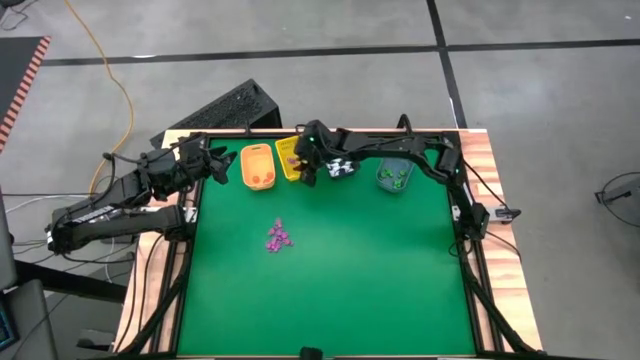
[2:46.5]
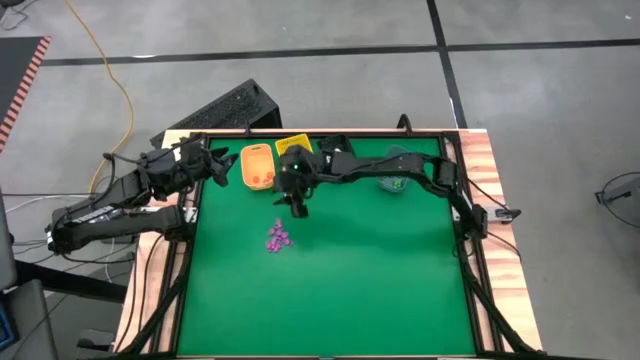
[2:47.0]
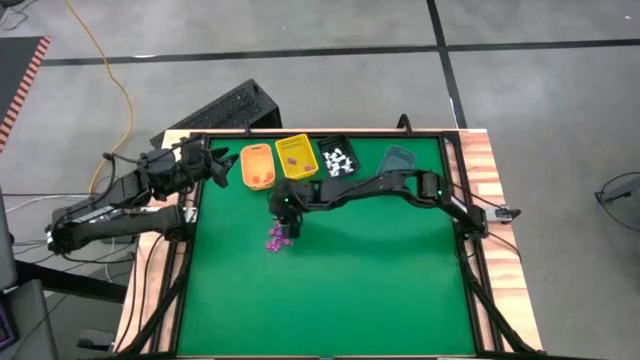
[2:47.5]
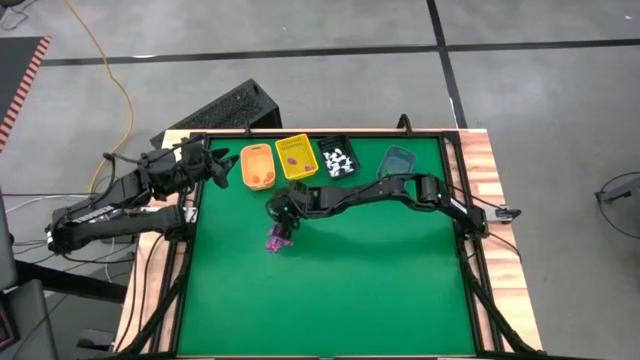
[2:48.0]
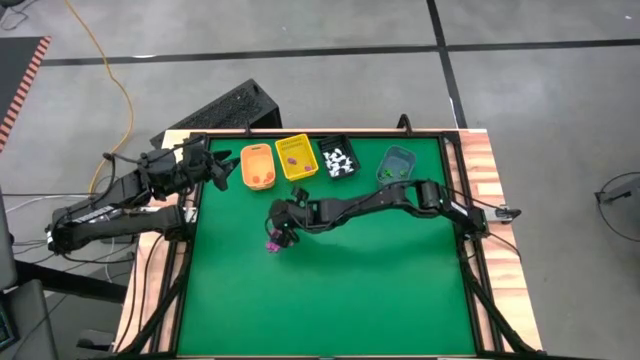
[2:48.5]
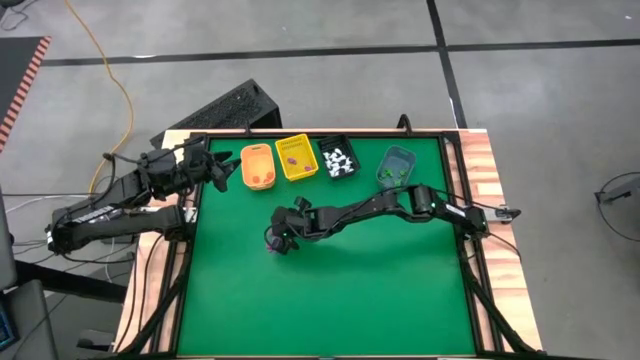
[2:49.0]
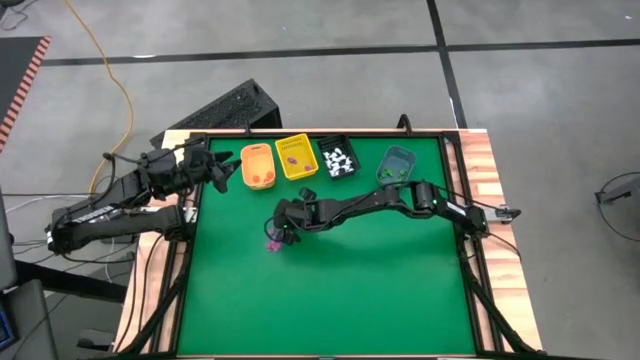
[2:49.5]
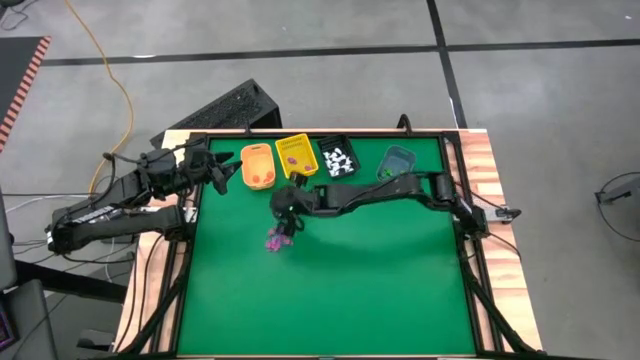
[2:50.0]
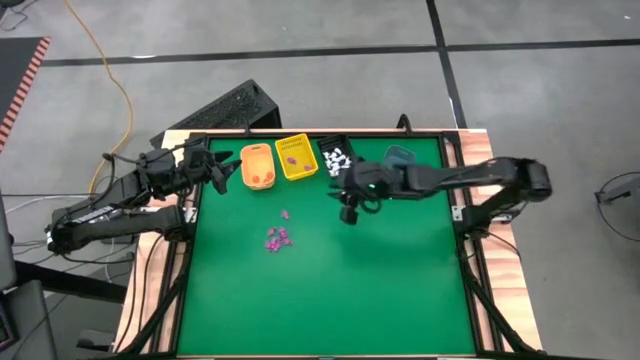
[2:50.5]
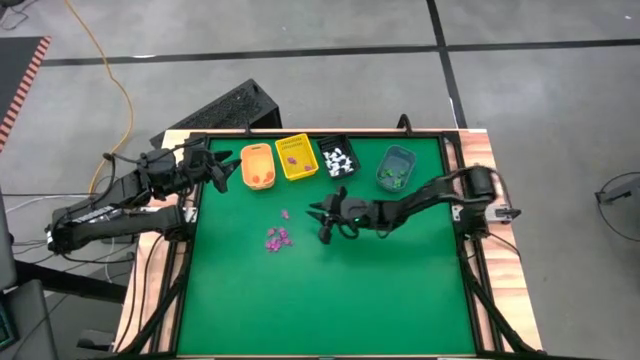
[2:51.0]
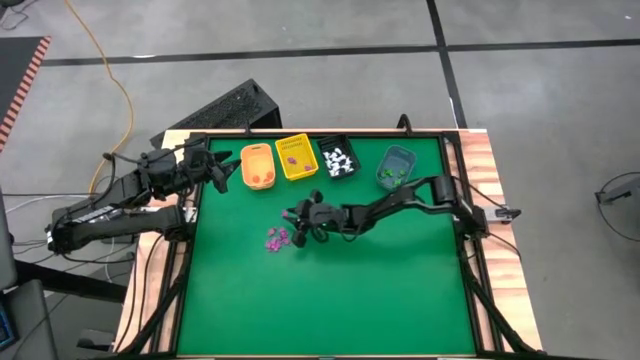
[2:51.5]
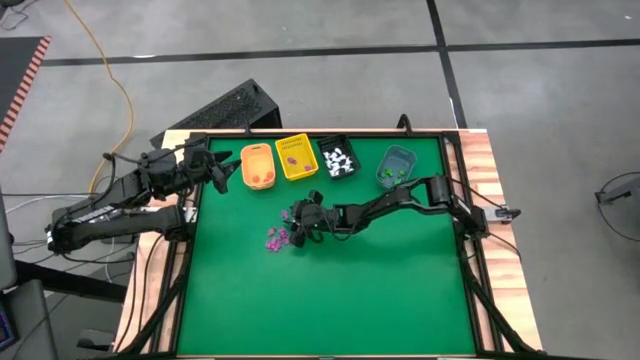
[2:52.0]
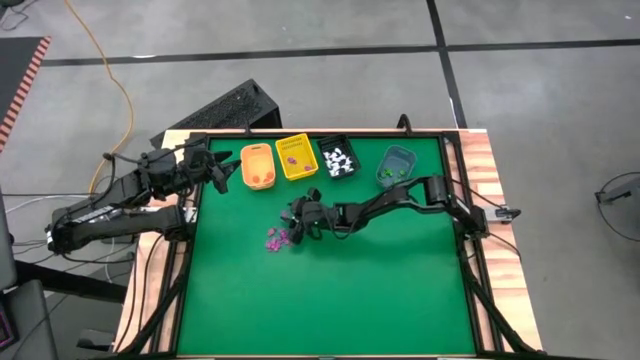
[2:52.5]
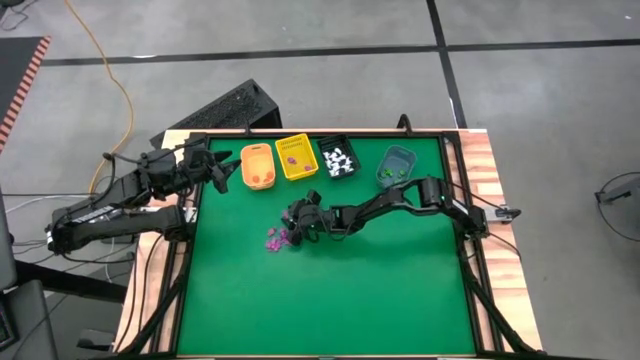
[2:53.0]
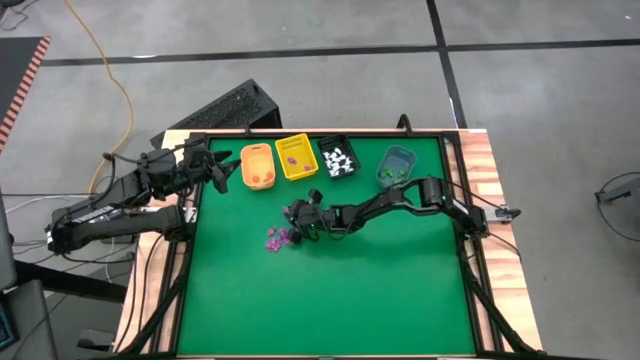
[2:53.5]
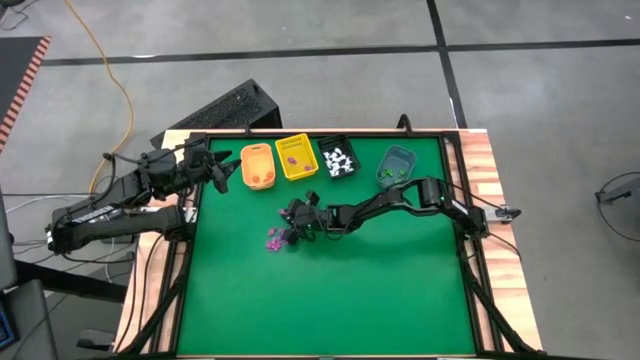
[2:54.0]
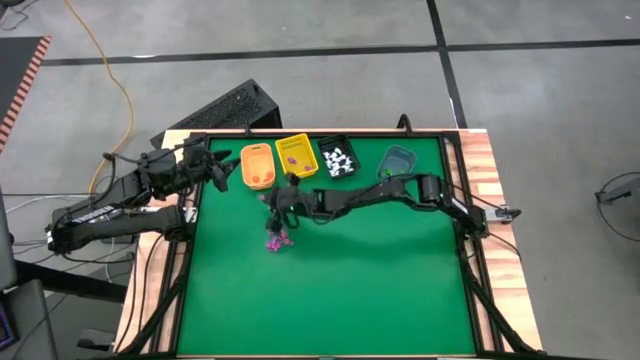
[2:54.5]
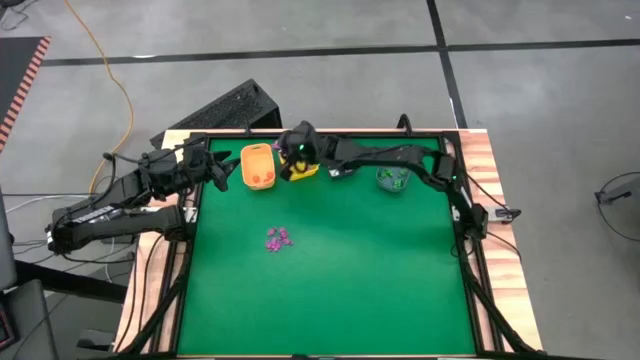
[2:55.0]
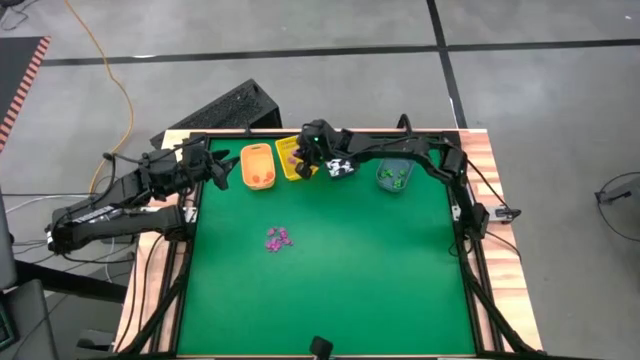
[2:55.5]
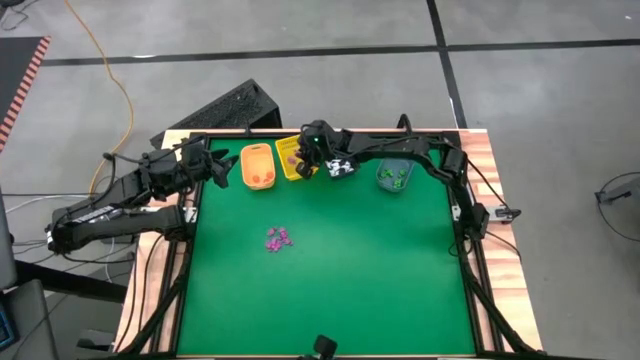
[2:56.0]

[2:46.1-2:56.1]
Task: Sort Halloween decoration
Put the pink skeleton toy into the yellow bin

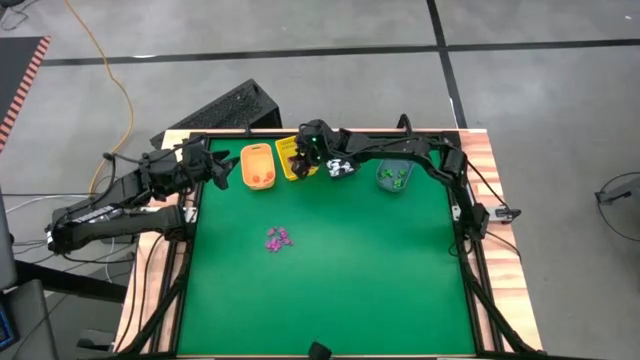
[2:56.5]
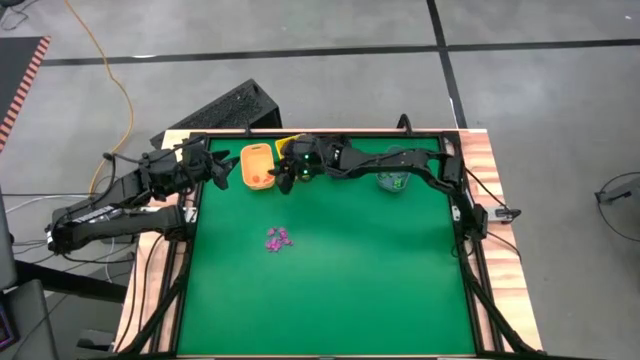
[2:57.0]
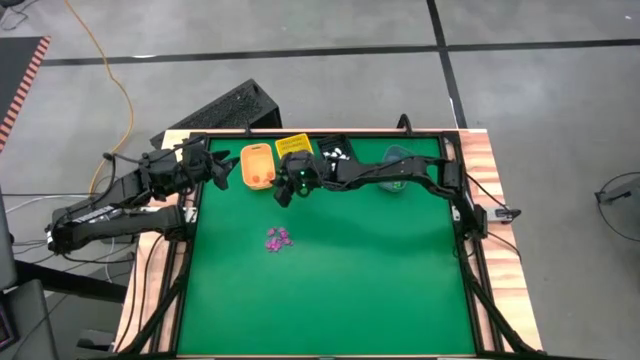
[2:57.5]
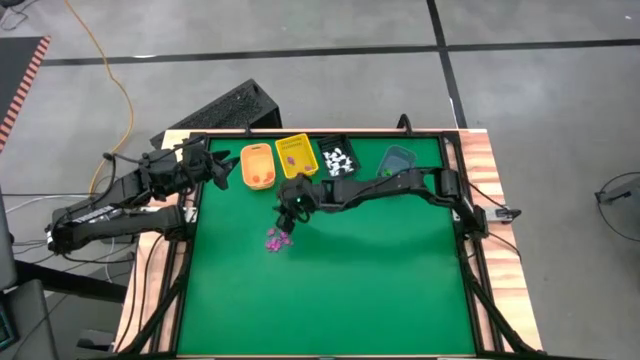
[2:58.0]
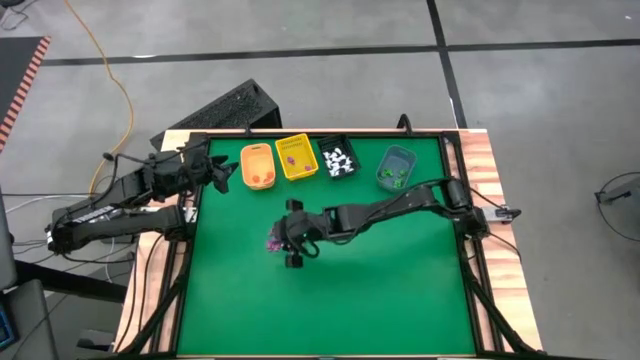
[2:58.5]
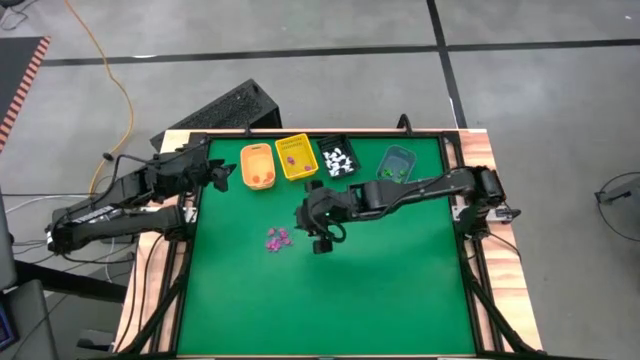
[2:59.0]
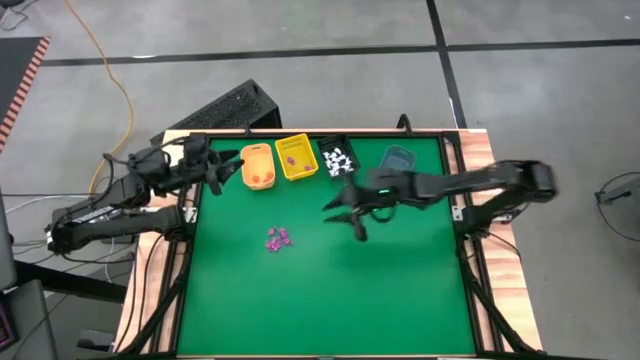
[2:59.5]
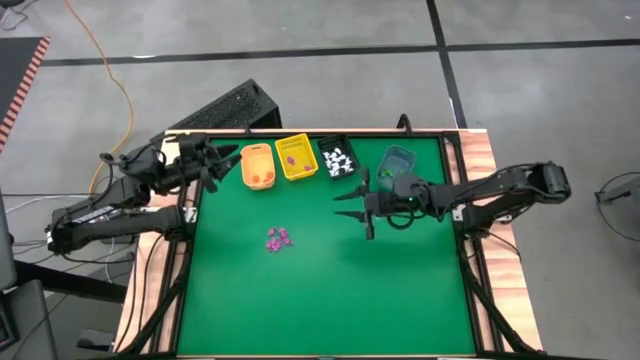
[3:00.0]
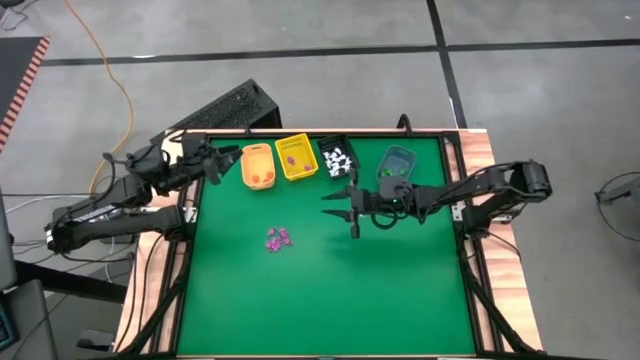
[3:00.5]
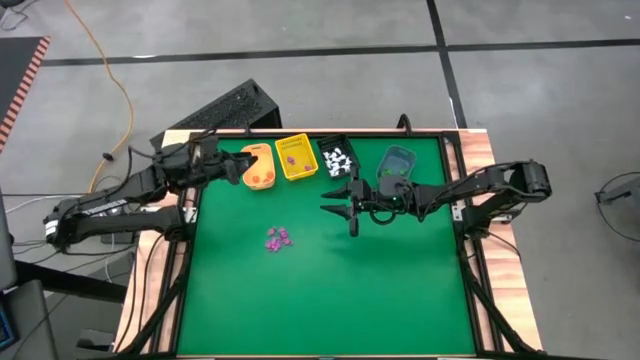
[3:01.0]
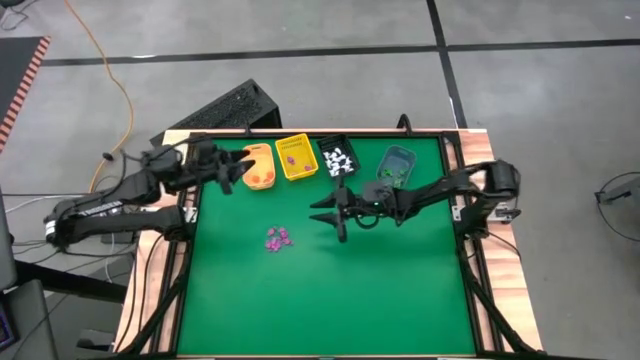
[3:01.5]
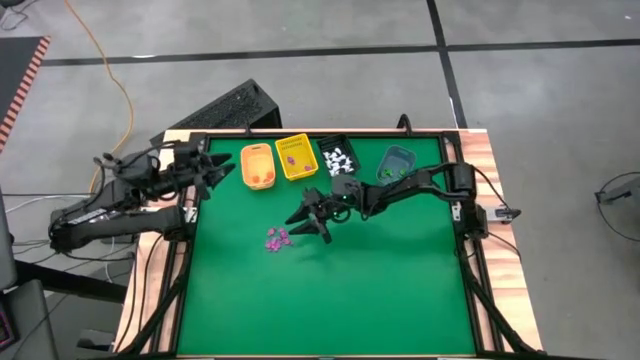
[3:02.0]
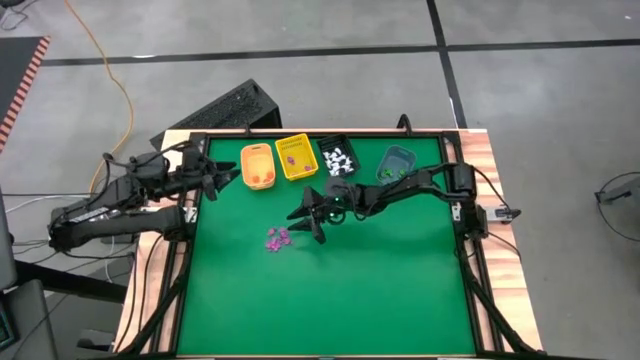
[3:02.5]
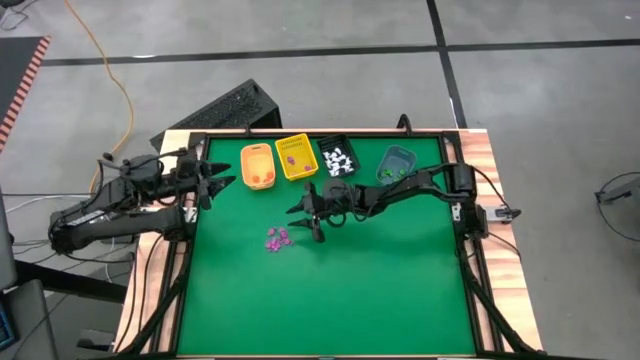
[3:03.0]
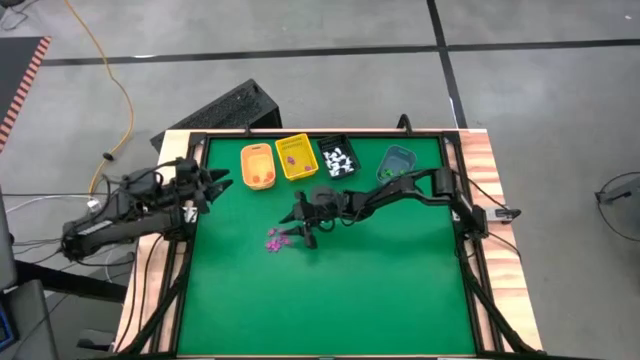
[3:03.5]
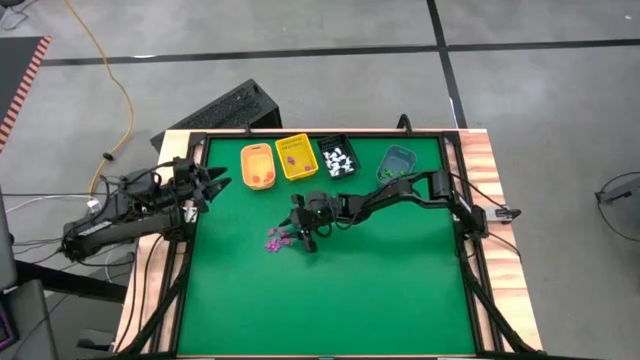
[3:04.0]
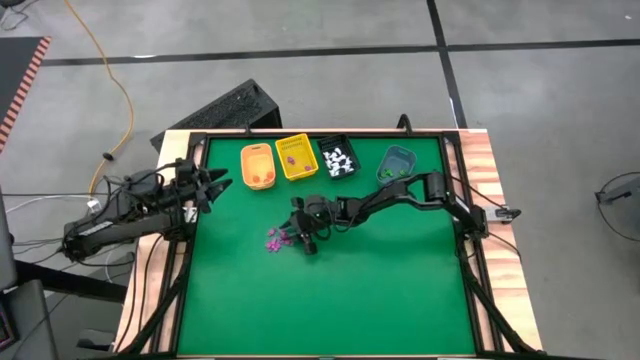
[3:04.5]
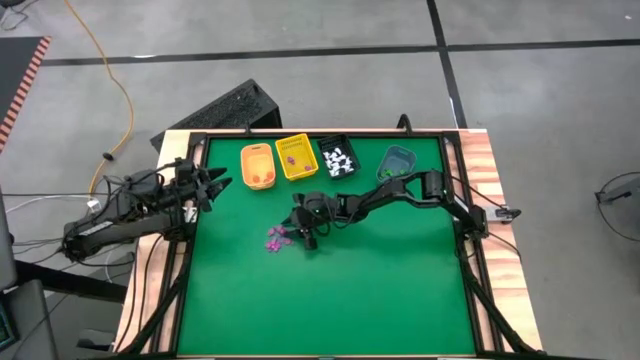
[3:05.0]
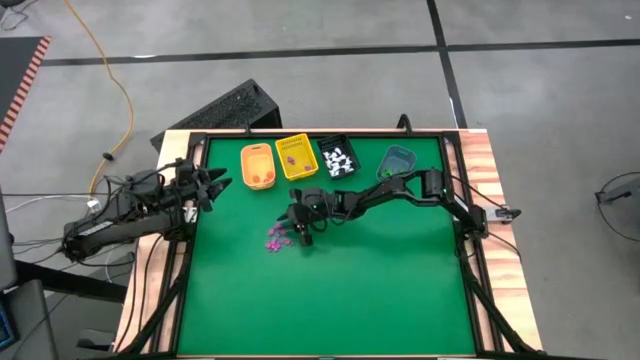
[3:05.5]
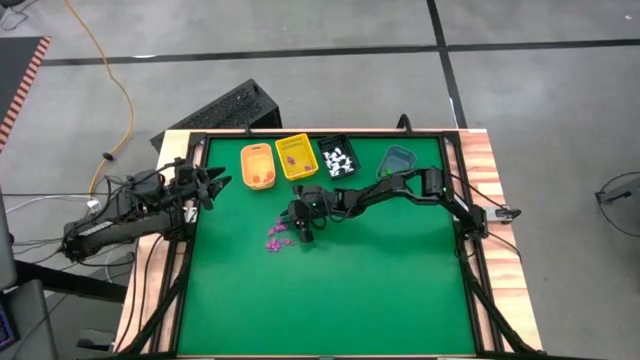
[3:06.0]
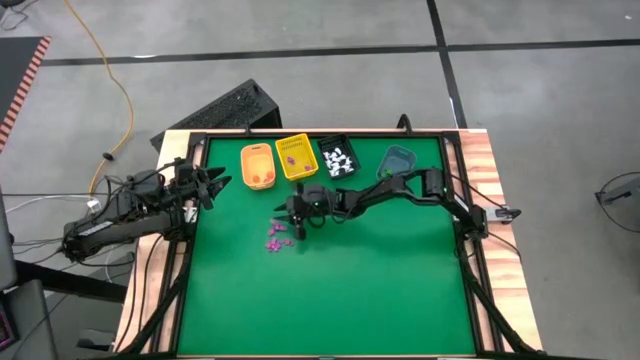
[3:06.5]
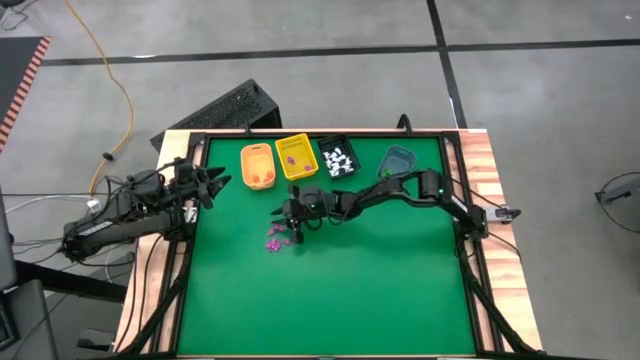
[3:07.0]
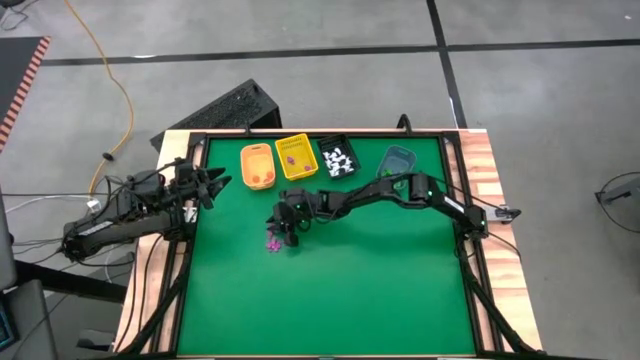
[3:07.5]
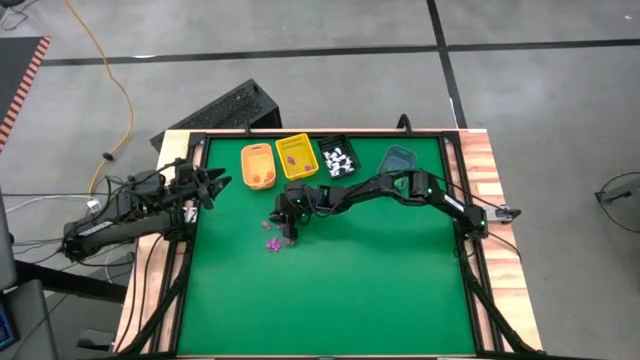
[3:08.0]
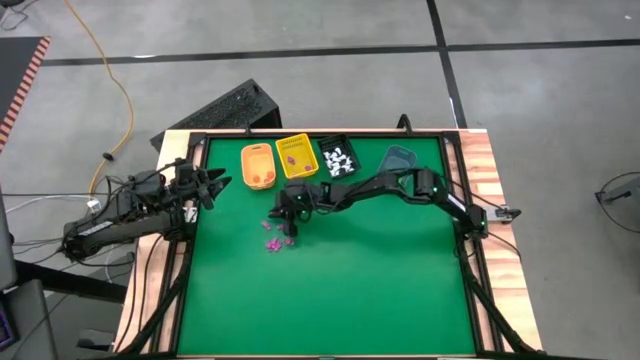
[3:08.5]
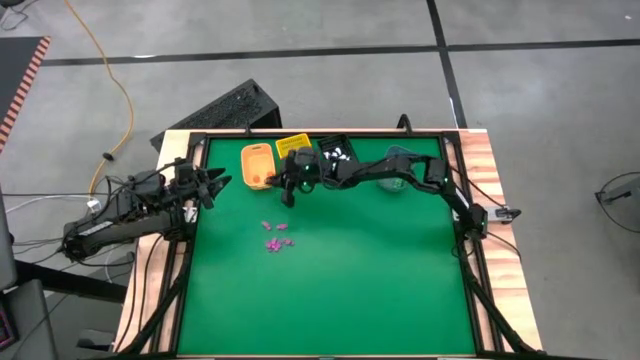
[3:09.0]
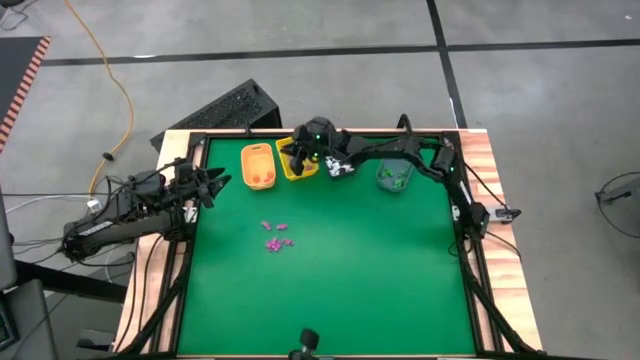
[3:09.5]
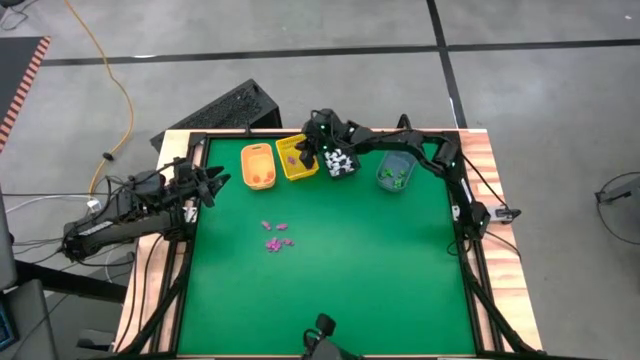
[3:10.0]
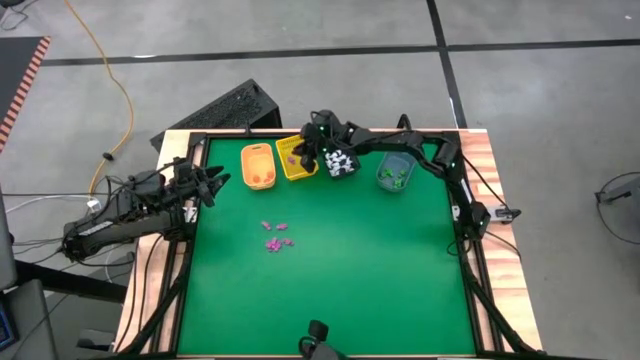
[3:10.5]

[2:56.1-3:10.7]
Put the pink skeleton toy into the yellow bin
